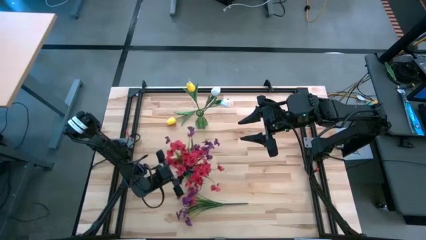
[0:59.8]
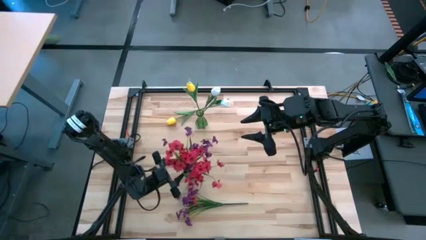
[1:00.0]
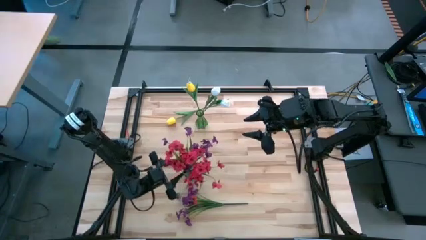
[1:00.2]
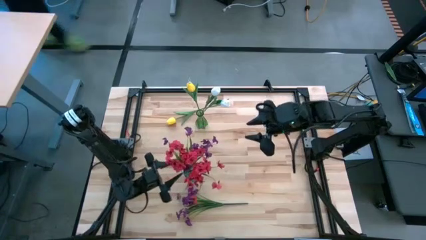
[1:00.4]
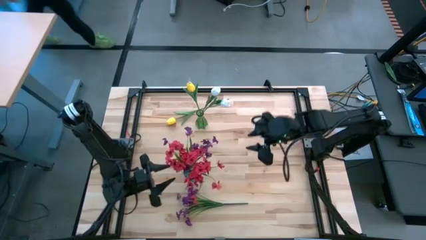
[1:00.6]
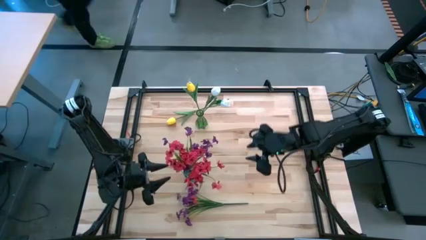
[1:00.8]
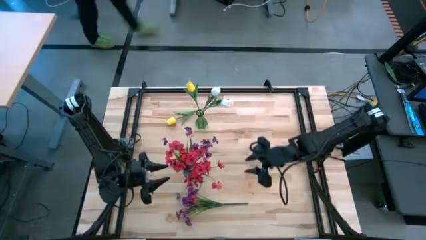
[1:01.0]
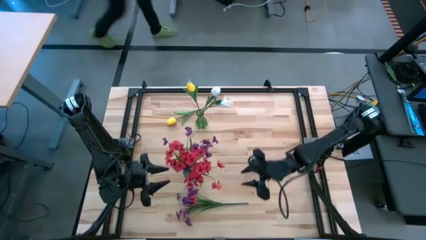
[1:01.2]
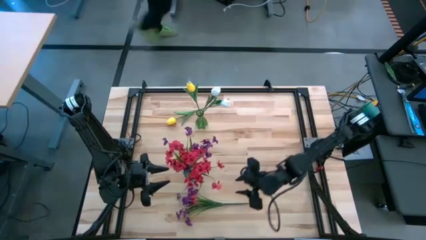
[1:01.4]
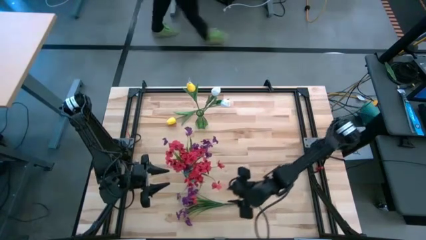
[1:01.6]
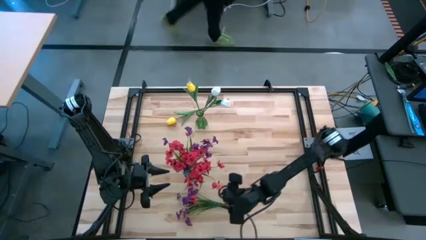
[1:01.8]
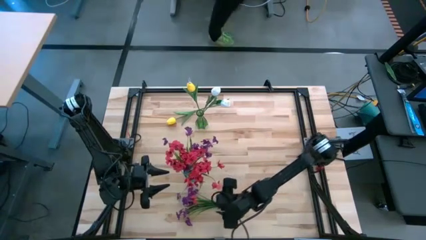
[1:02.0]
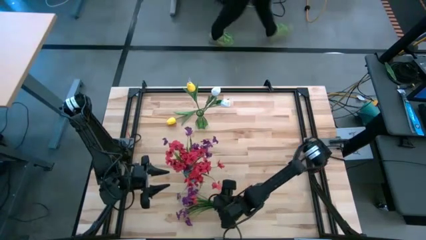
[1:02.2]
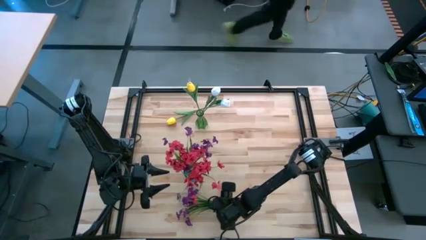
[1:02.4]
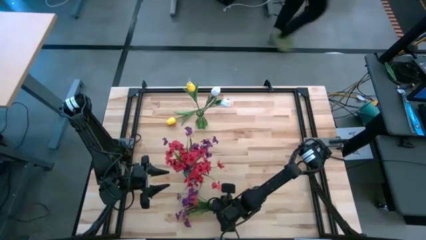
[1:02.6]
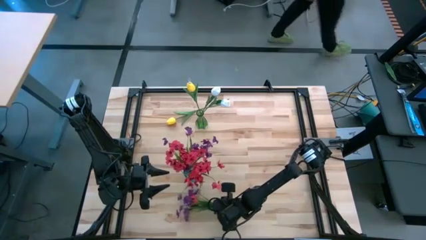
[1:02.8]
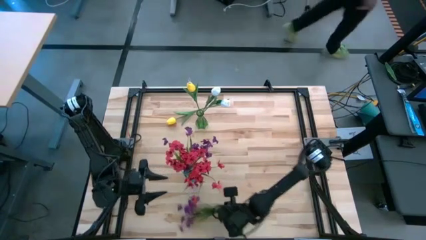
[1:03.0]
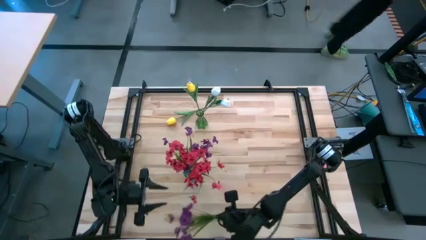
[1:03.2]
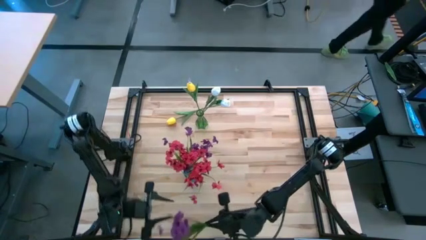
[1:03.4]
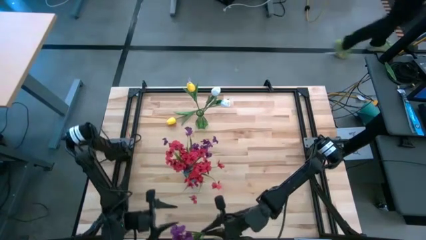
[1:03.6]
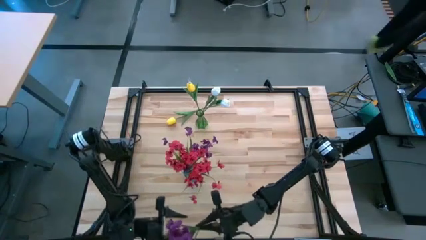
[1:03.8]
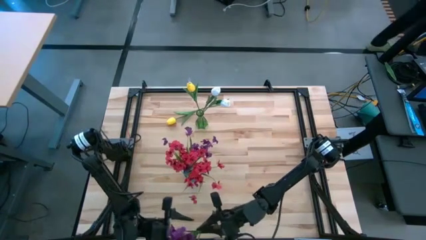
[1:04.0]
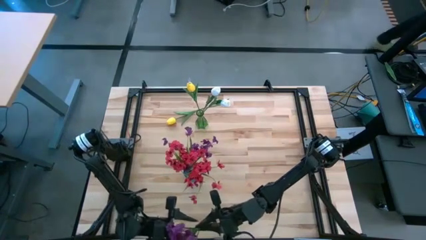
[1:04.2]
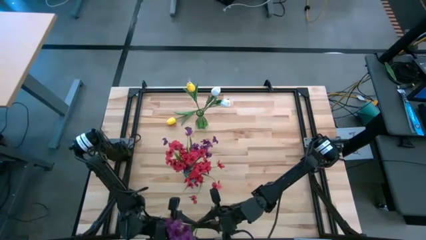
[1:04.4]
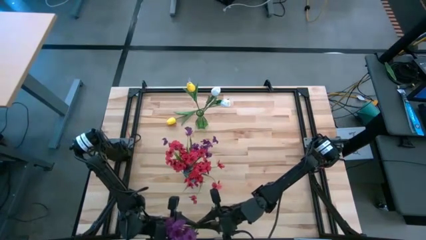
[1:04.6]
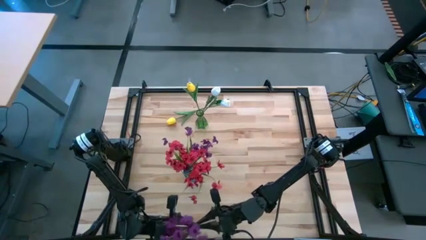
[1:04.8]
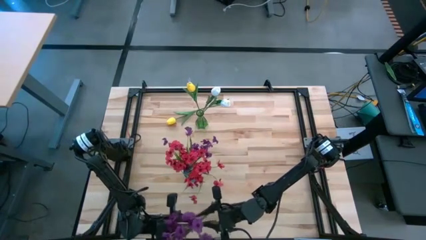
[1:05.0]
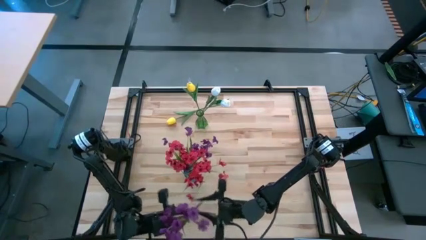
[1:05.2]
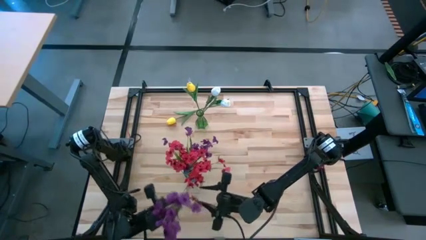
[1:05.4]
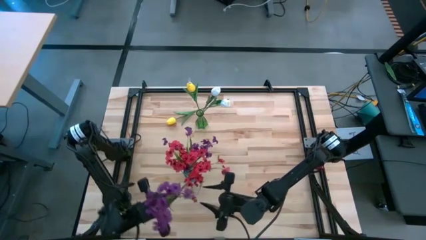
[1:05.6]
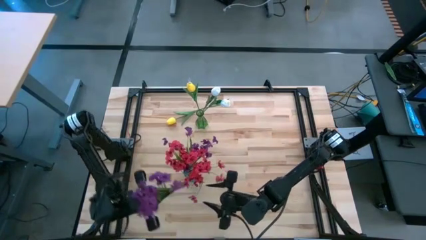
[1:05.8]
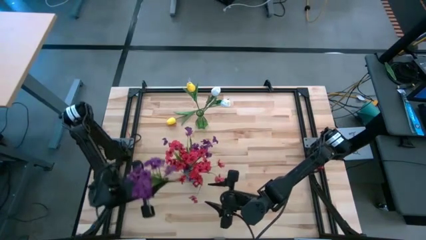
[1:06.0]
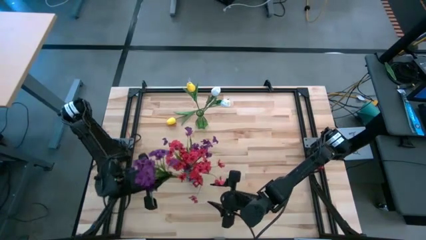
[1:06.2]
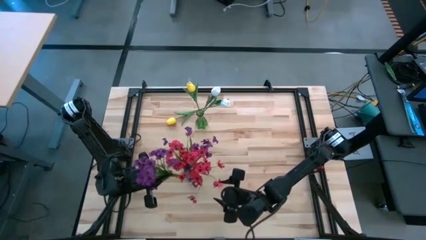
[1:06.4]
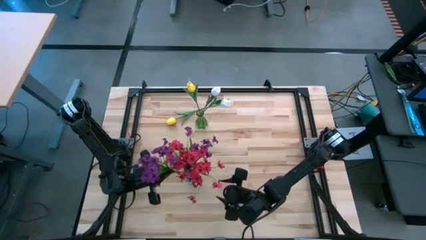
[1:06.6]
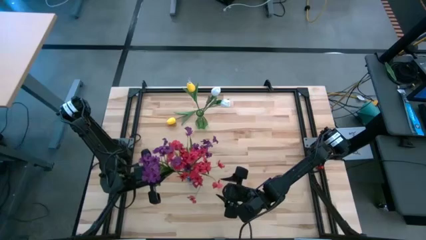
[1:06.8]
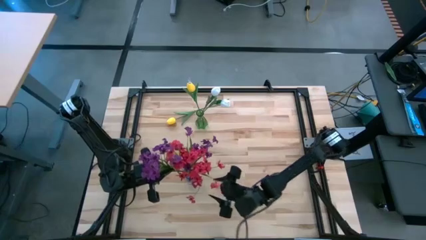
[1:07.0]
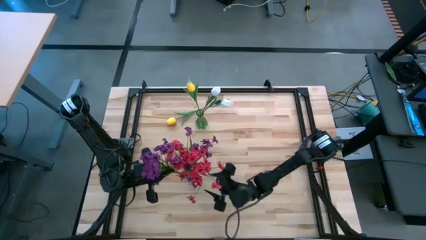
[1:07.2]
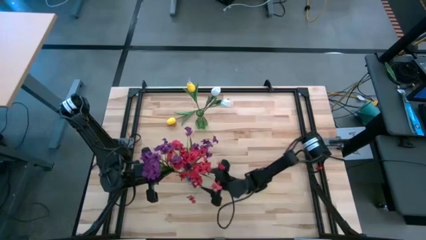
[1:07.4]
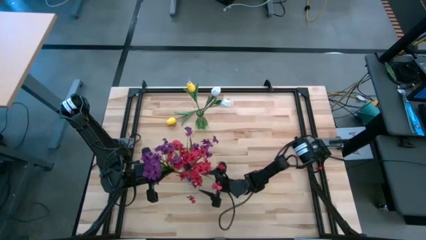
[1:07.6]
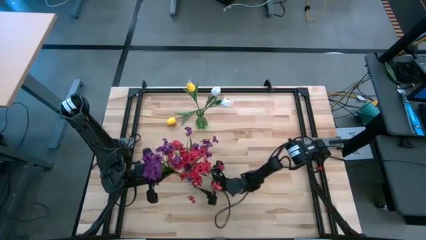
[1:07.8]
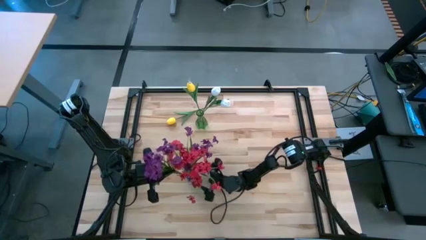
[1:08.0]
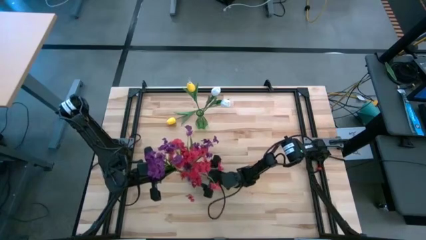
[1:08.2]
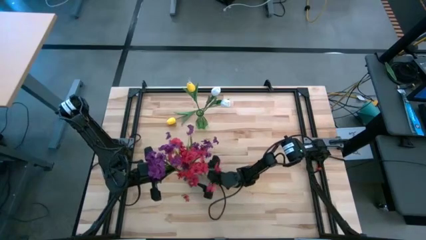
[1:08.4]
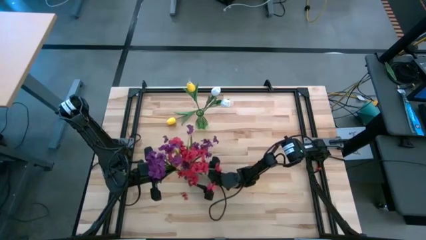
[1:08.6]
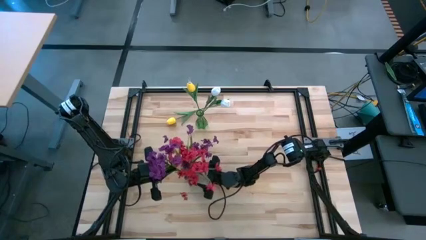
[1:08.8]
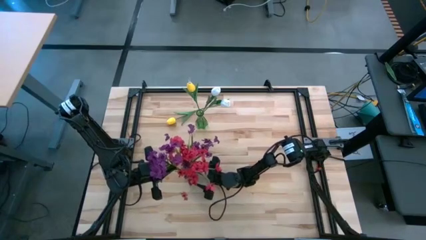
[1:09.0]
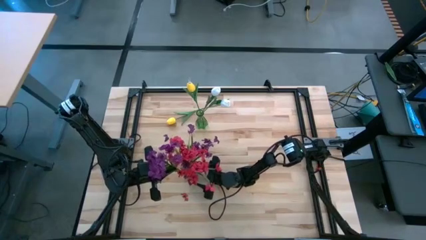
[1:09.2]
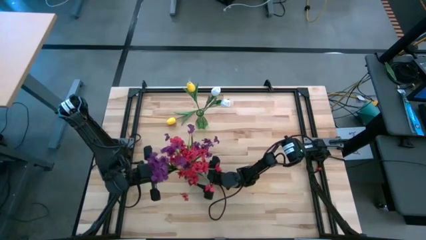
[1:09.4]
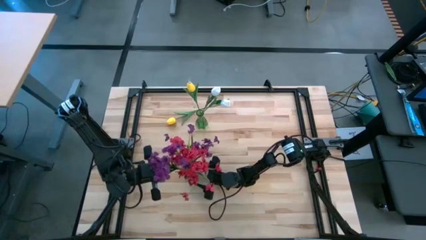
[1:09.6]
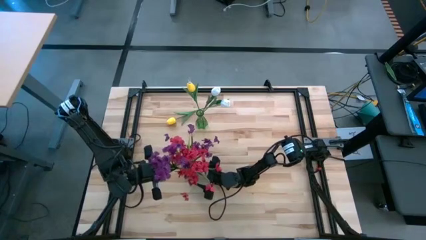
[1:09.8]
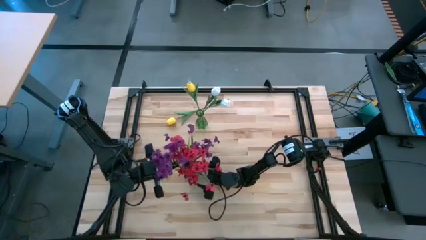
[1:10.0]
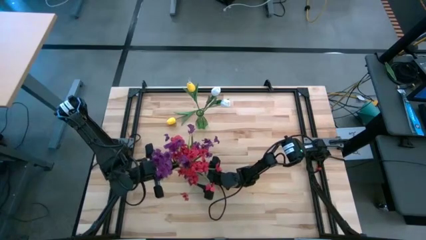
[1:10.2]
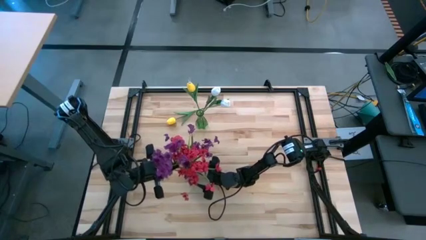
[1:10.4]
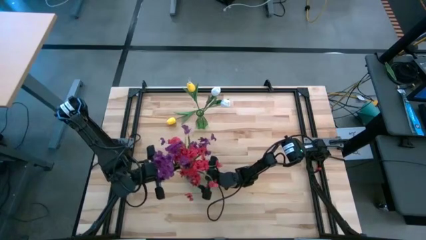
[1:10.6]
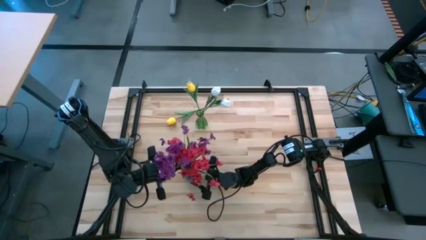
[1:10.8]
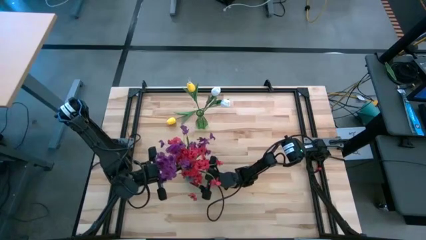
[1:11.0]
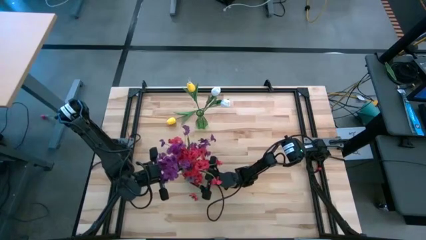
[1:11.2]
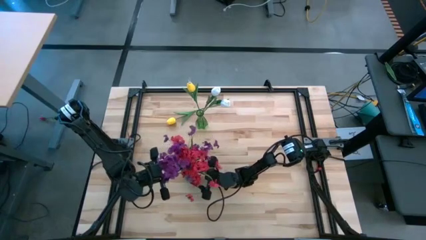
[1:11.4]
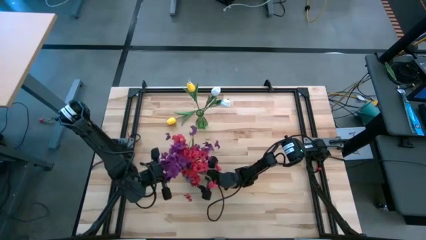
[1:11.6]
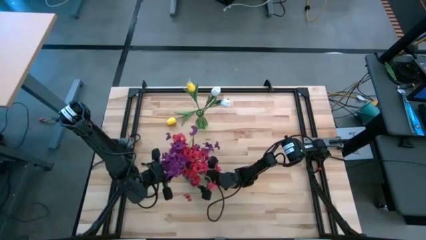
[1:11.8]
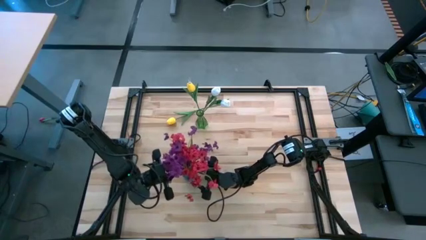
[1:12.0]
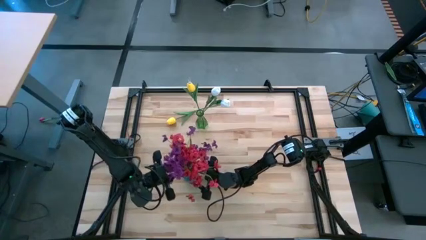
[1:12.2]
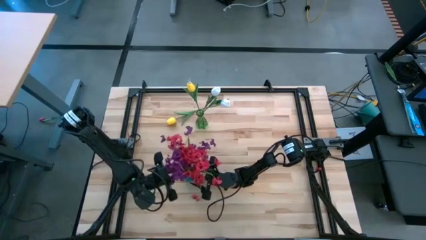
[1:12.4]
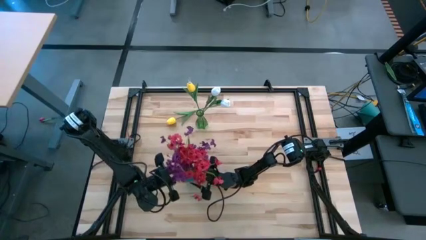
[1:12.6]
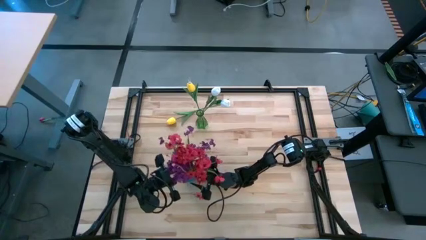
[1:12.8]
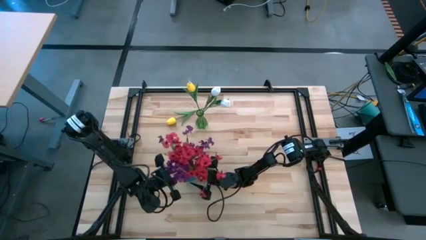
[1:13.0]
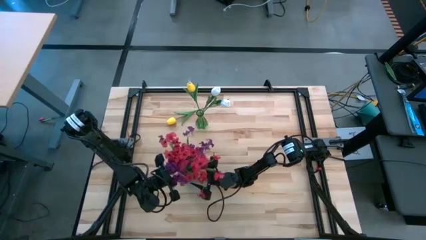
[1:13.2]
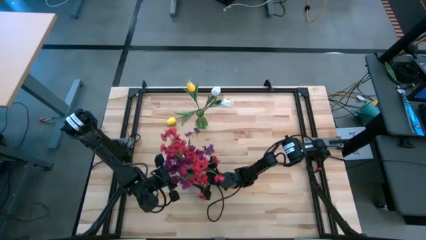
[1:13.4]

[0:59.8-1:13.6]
Task: Sort flowers into vase by color
Put the purple flowers into the blue vase
